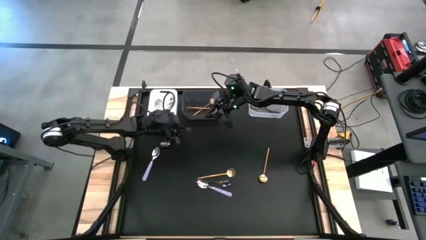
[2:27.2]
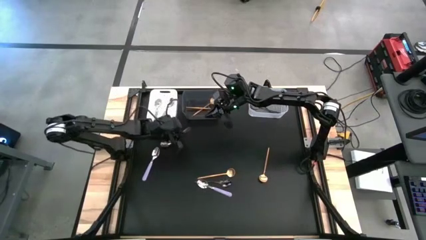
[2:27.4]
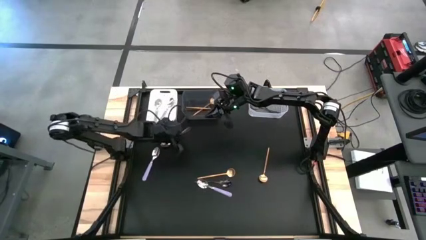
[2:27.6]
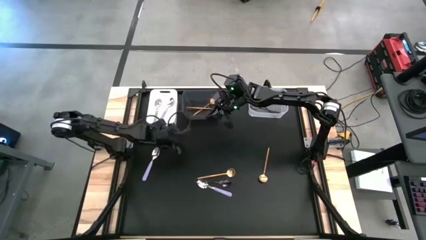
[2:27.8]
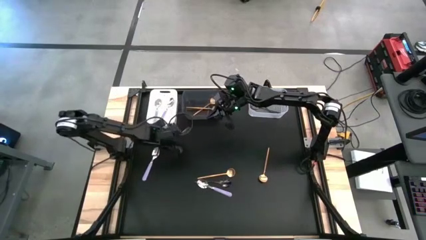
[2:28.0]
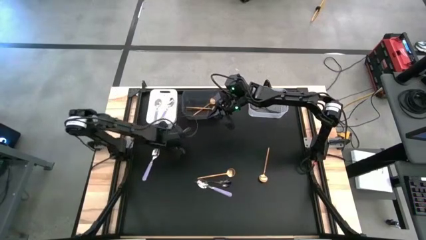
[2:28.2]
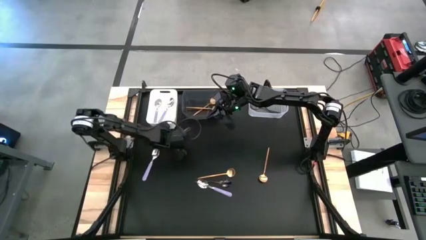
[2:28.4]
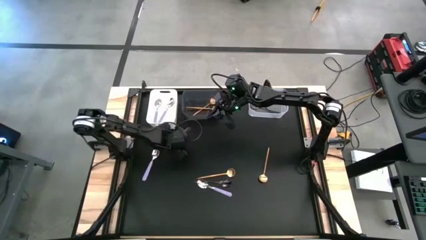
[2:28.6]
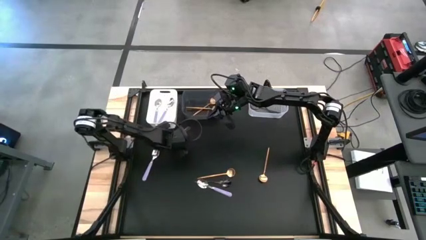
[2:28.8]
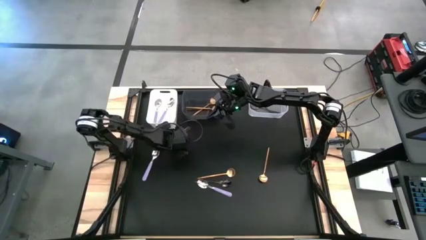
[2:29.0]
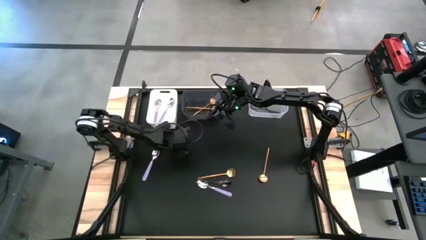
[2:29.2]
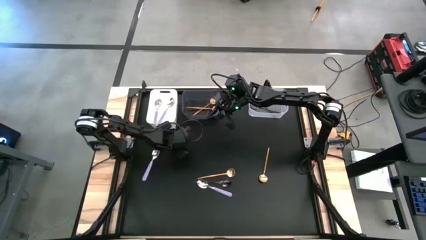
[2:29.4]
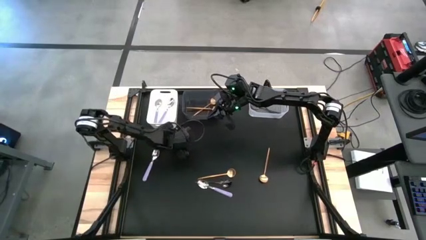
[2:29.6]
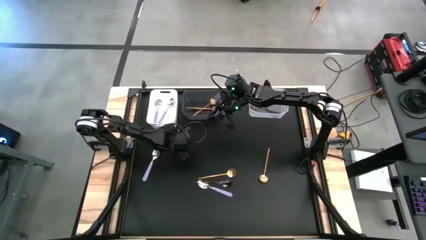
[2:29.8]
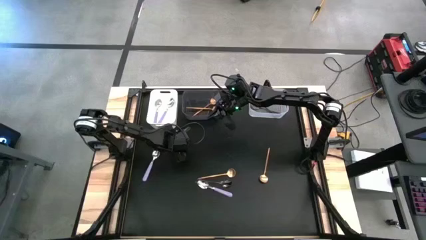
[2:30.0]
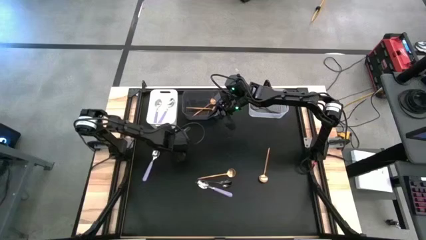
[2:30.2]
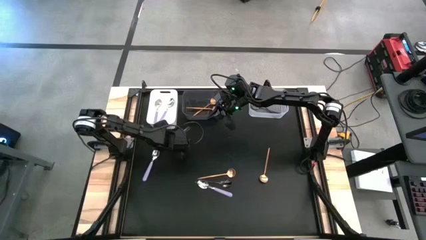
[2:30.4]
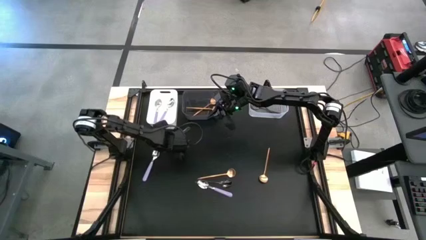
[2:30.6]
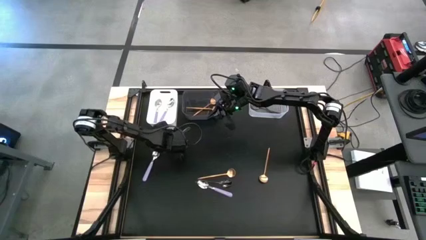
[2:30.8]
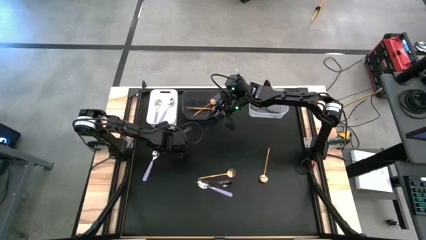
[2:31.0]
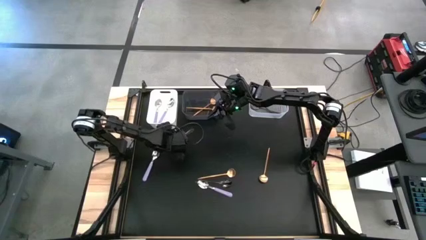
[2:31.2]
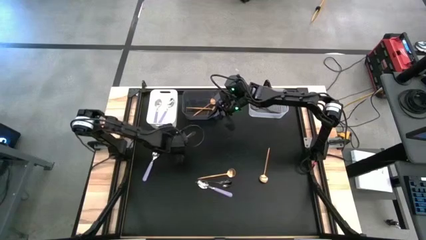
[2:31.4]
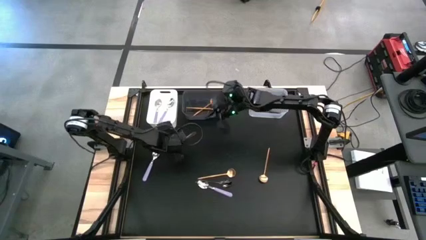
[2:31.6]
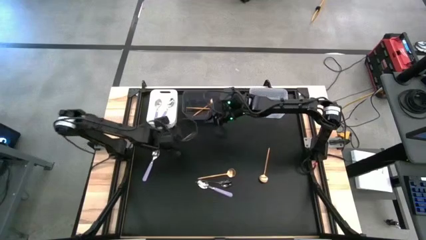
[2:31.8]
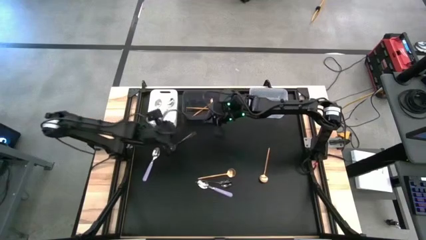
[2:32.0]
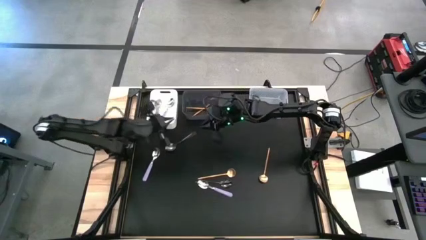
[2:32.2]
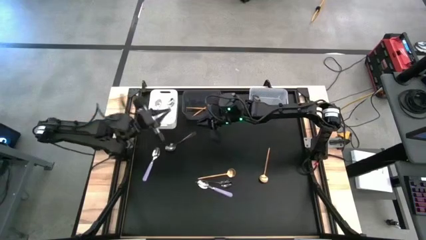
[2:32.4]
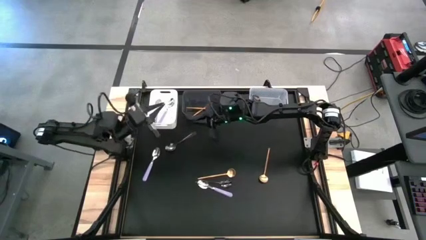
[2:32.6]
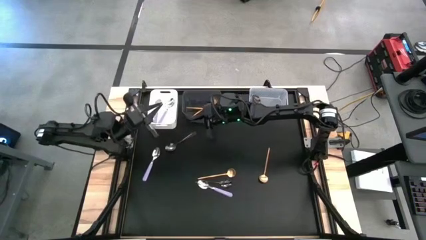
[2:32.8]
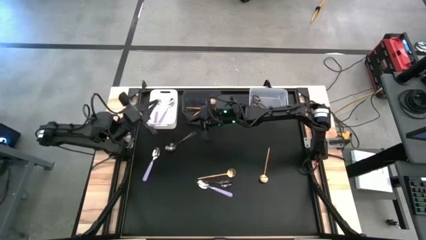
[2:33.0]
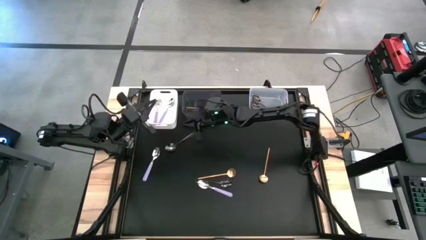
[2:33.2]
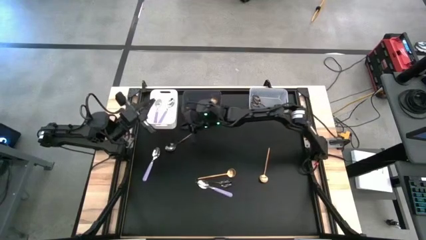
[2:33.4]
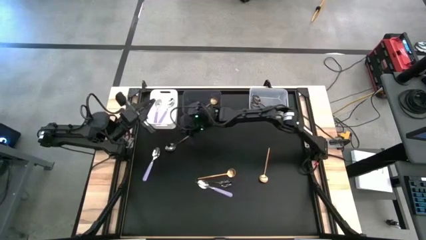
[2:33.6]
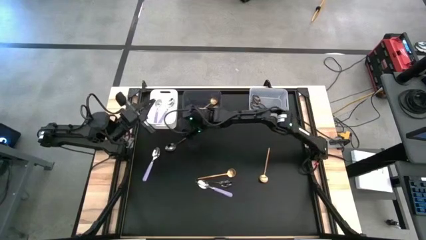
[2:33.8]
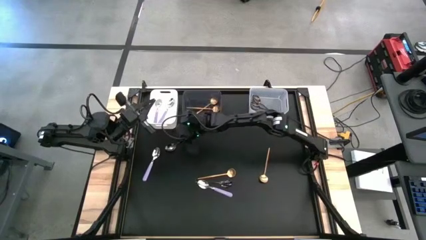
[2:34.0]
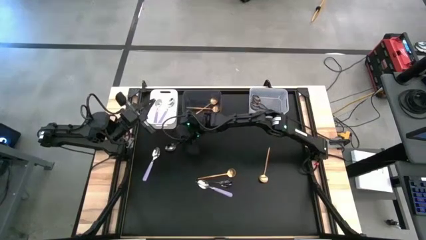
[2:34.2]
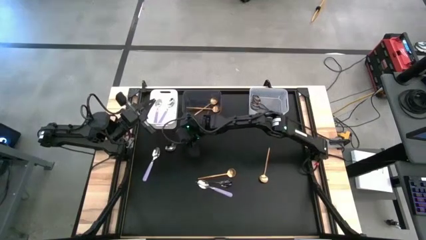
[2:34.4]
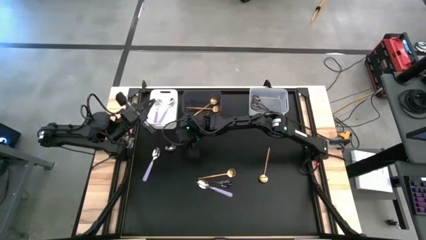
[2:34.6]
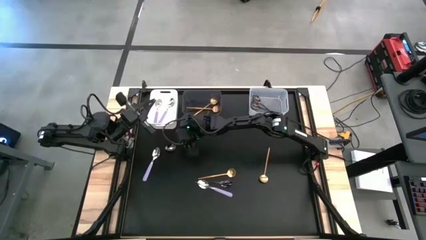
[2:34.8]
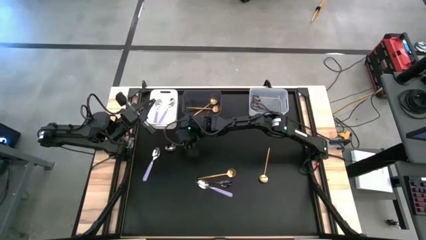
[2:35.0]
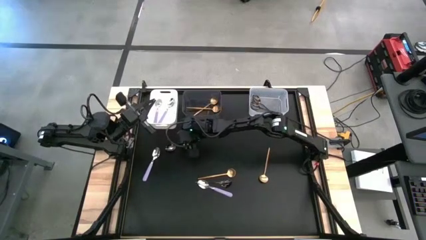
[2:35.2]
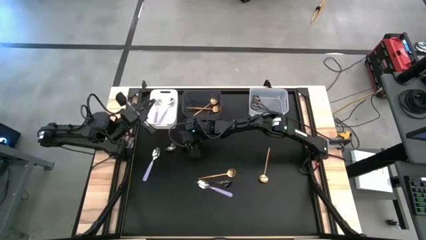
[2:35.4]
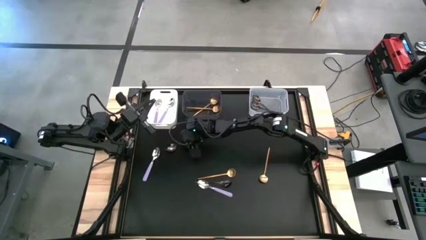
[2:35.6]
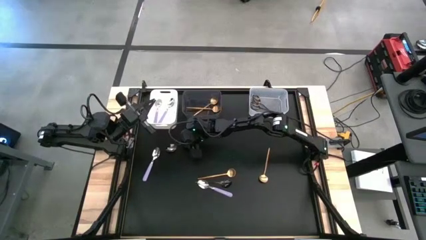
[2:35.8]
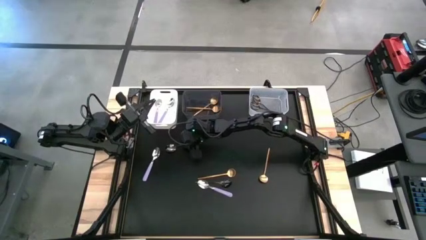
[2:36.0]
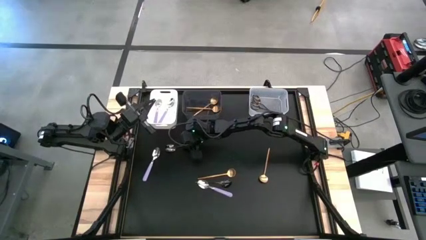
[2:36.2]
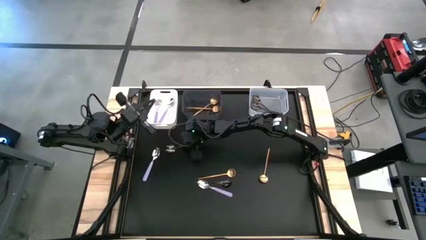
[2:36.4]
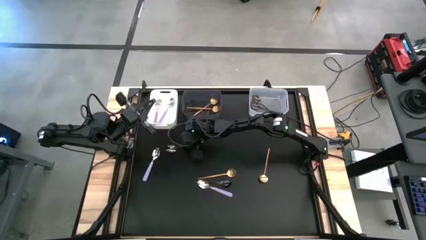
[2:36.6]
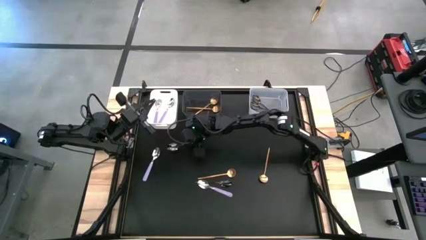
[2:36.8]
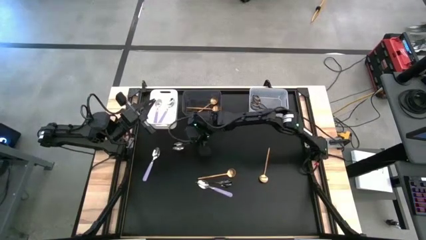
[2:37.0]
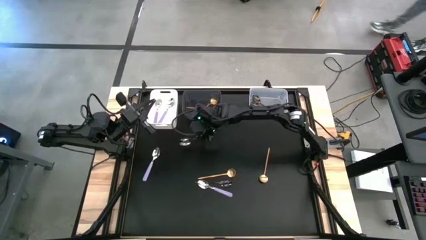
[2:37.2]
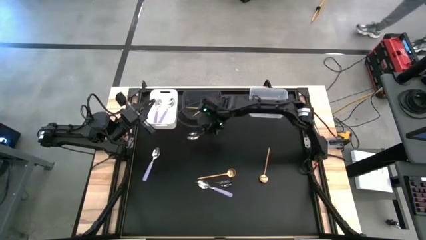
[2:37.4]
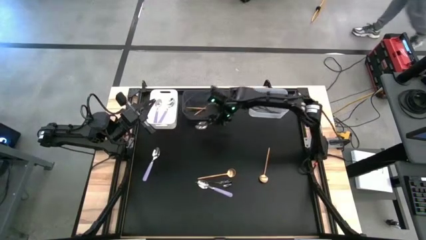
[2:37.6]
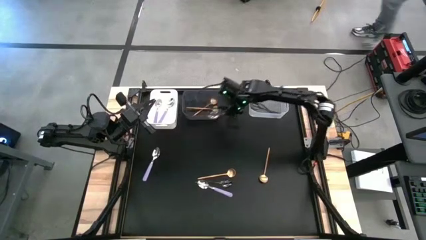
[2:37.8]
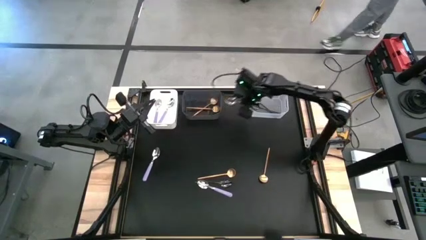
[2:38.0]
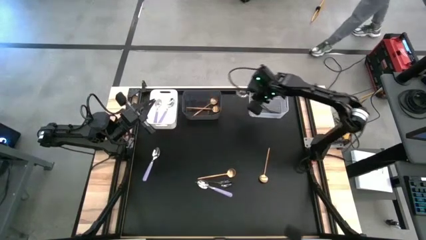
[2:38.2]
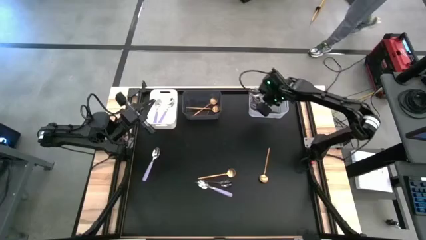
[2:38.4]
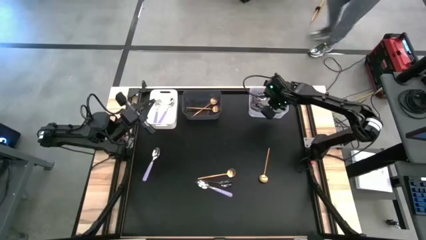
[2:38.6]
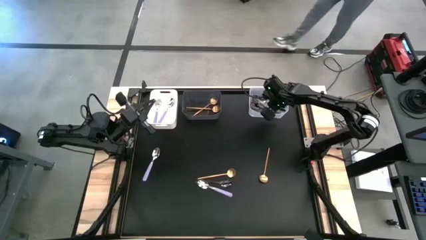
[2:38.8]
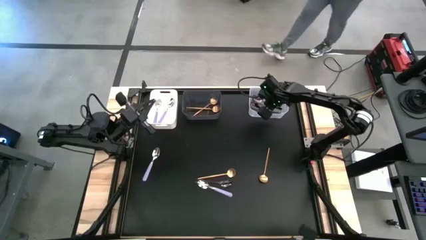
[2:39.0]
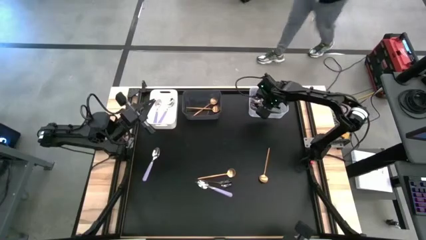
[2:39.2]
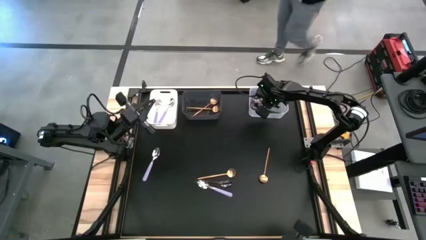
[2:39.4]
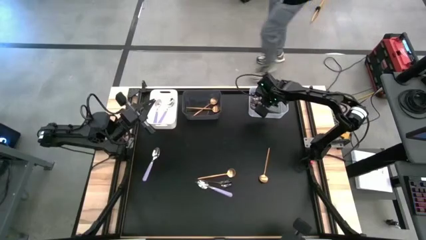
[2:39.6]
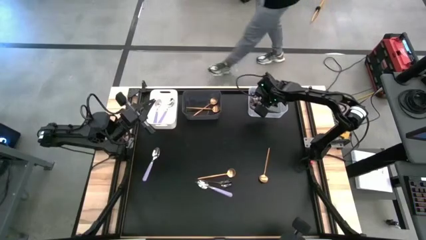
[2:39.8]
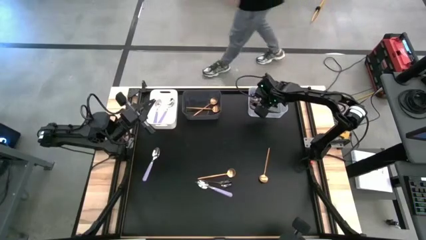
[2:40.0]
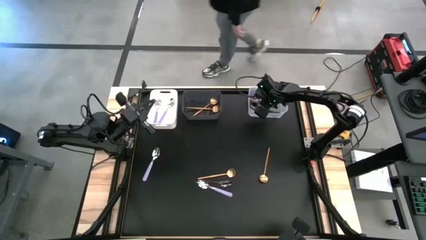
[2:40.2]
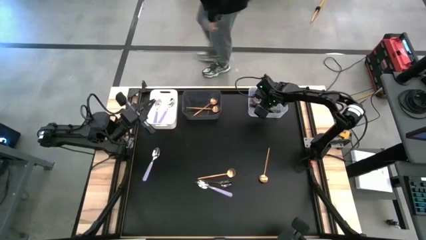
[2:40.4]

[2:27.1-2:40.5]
Task: Sort silverware by color (type)
Put the black spoon into the transparent bin
